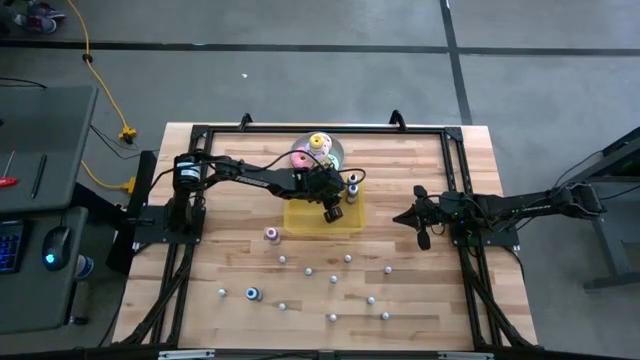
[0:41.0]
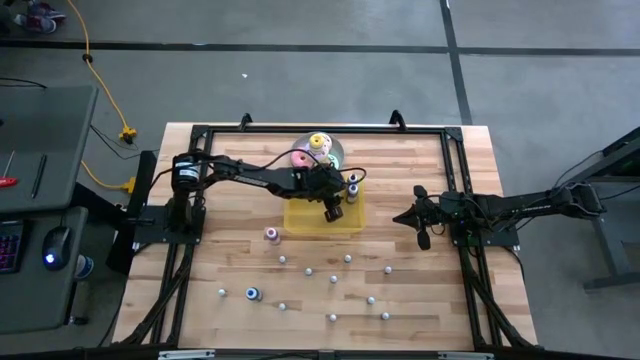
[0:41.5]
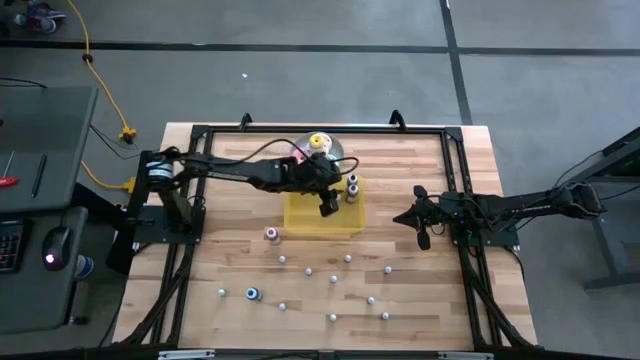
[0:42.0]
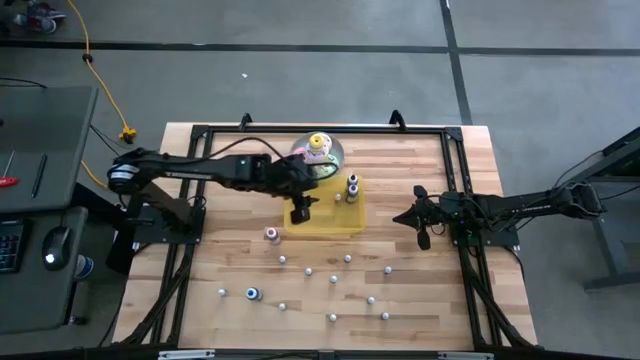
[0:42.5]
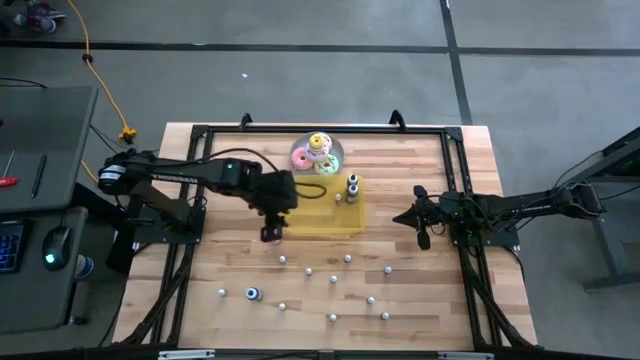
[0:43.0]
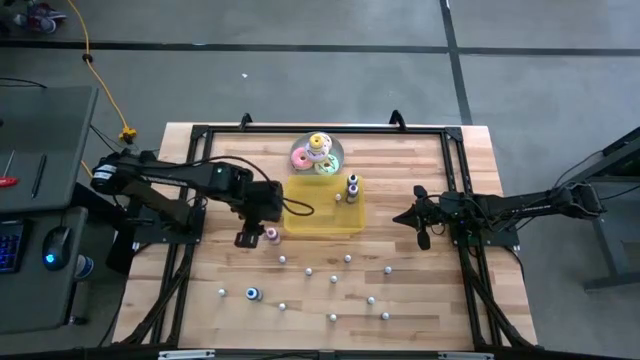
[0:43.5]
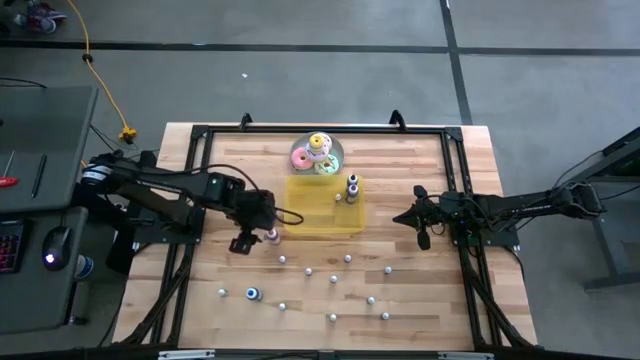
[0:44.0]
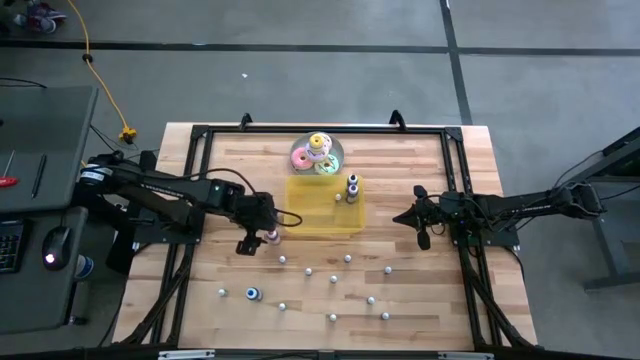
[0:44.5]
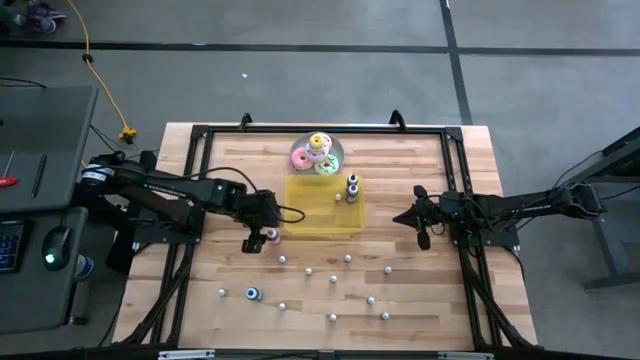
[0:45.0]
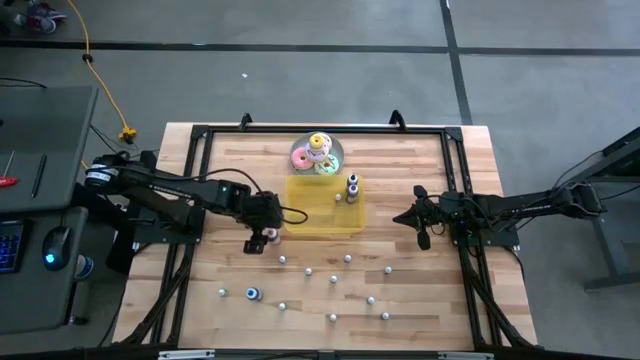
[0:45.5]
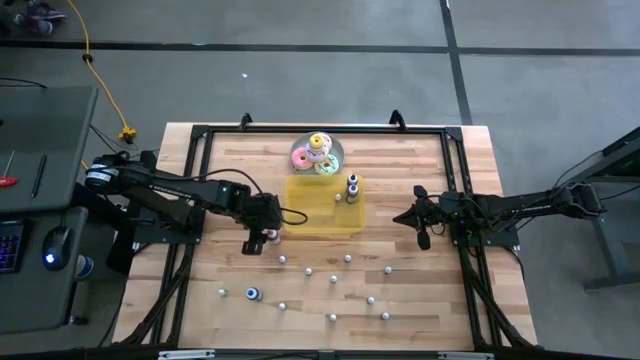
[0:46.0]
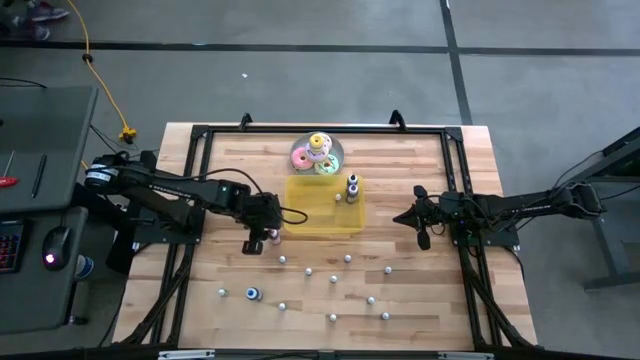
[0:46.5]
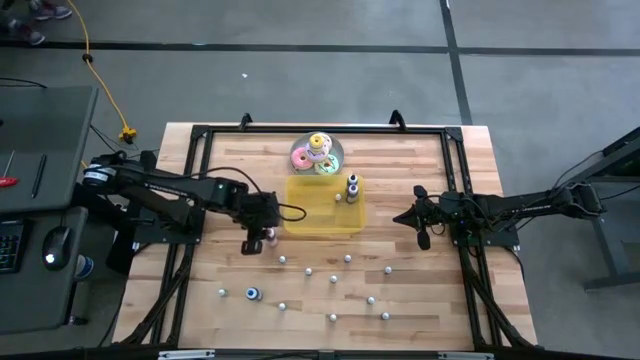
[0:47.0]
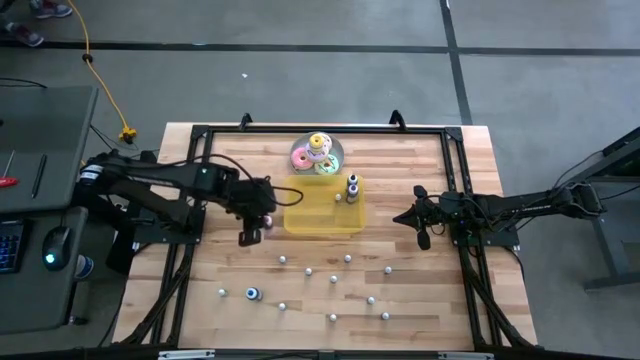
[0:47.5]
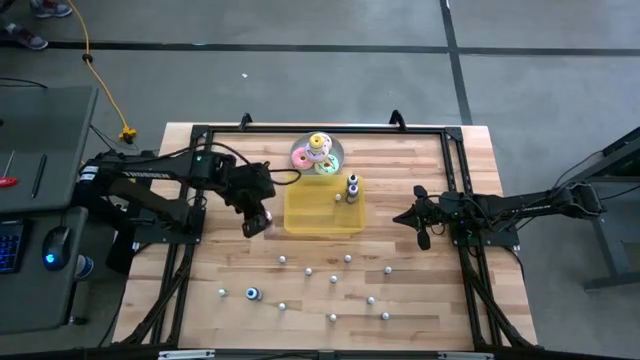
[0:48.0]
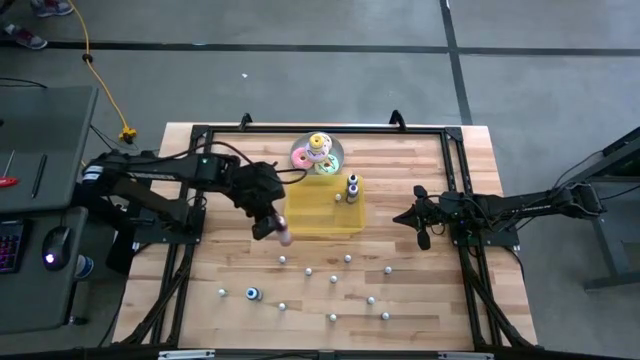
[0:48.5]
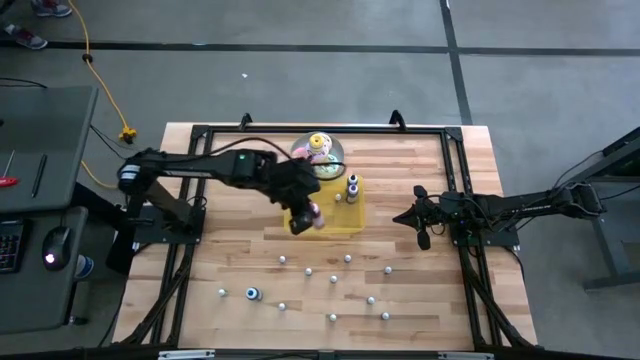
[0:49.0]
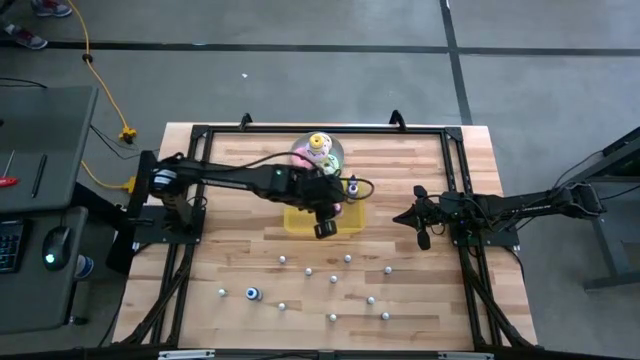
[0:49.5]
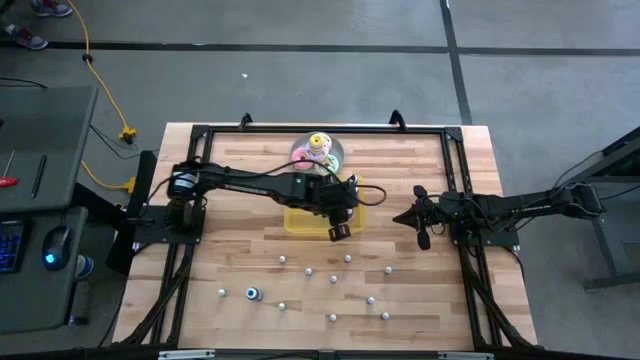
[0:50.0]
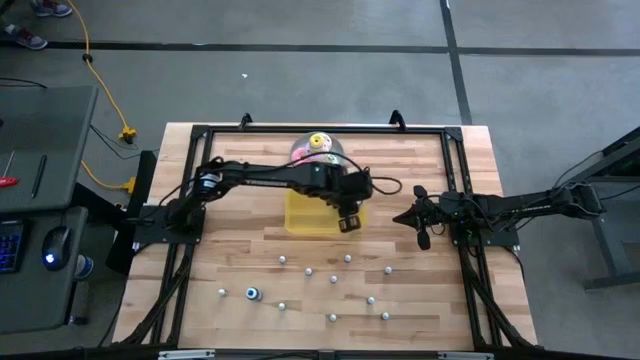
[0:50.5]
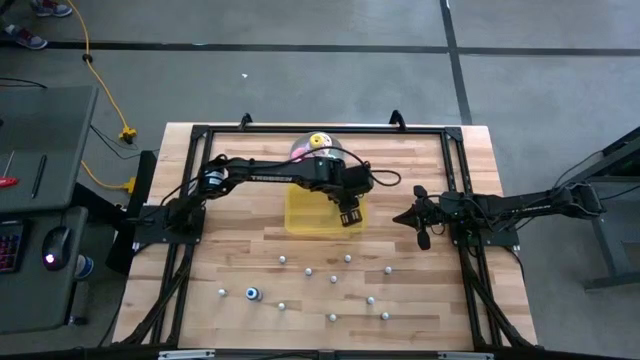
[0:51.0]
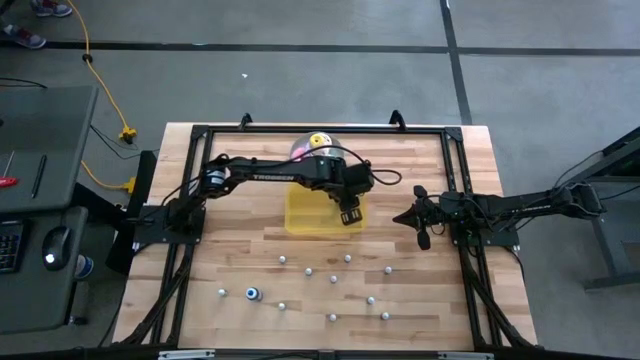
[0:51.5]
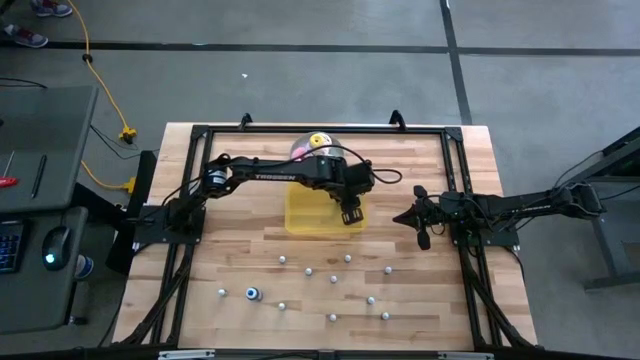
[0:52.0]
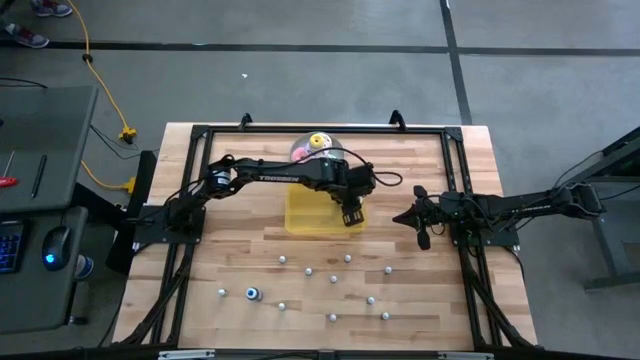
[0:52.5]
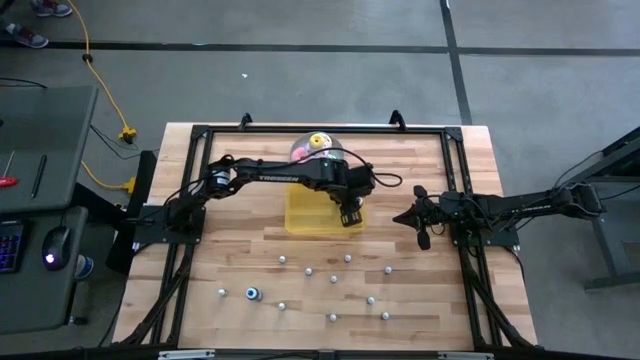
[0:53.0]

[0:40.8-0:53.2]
Task: Pick & Place food coloring
Put the large pink food coloring bottle into the yellow container

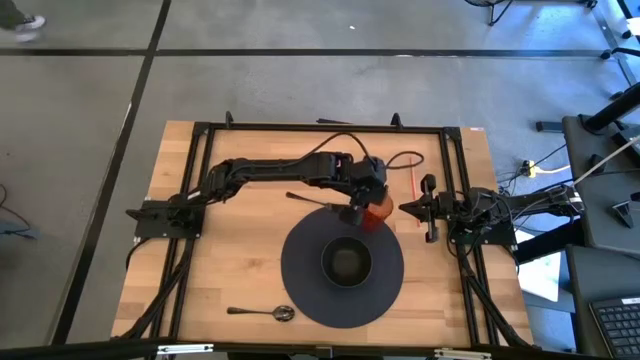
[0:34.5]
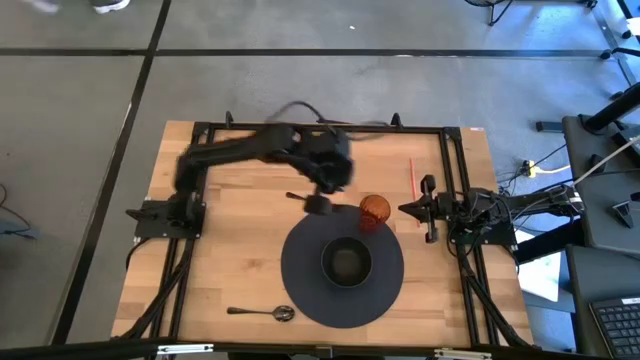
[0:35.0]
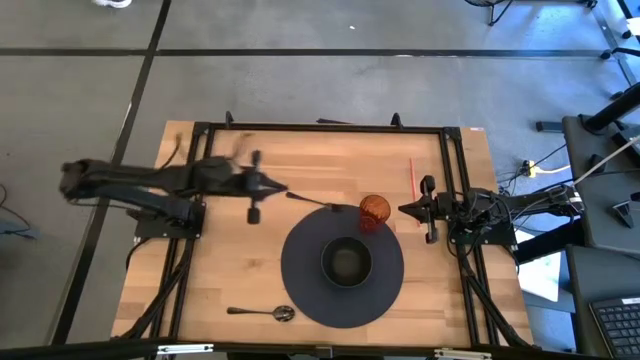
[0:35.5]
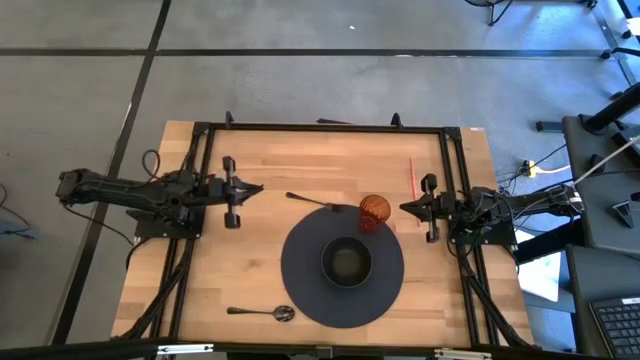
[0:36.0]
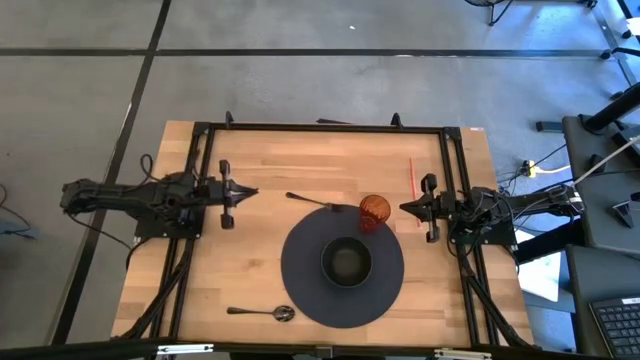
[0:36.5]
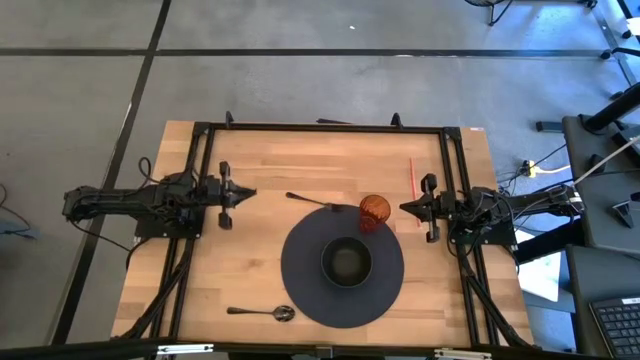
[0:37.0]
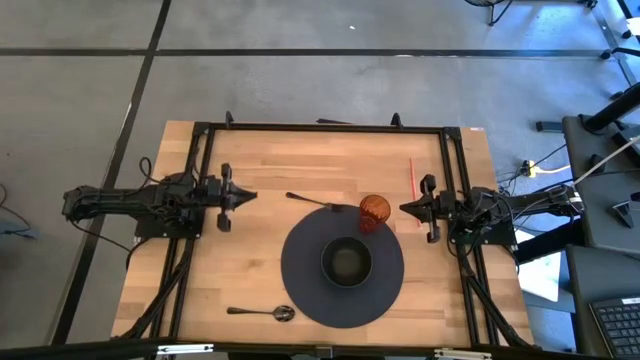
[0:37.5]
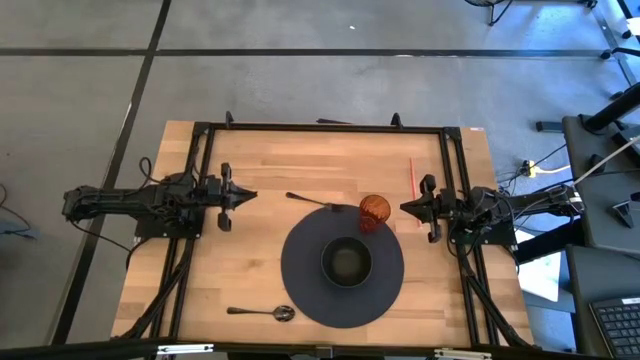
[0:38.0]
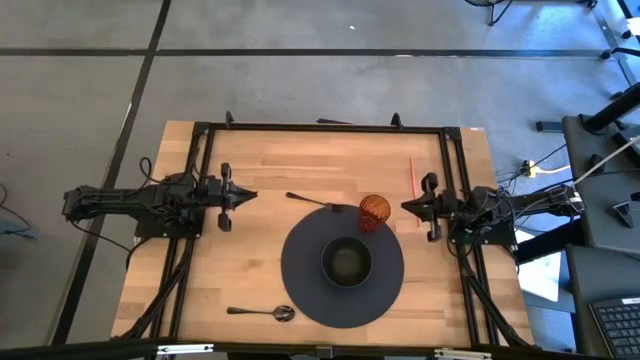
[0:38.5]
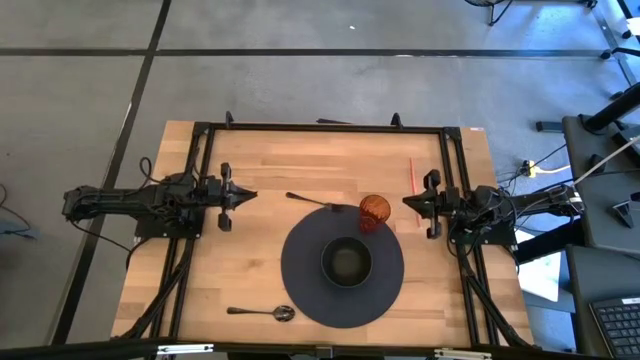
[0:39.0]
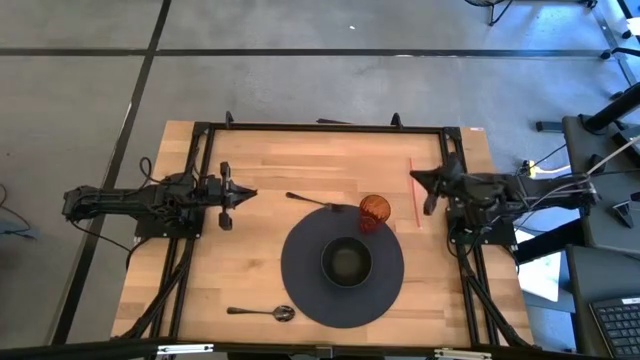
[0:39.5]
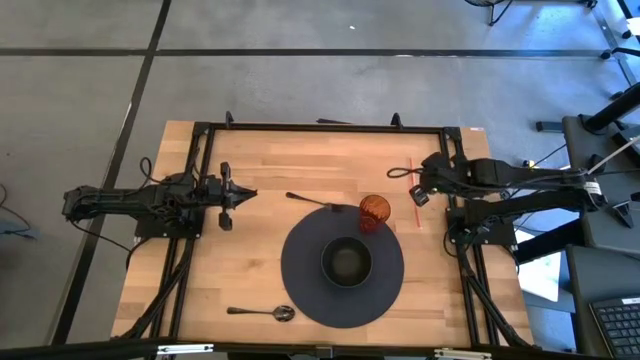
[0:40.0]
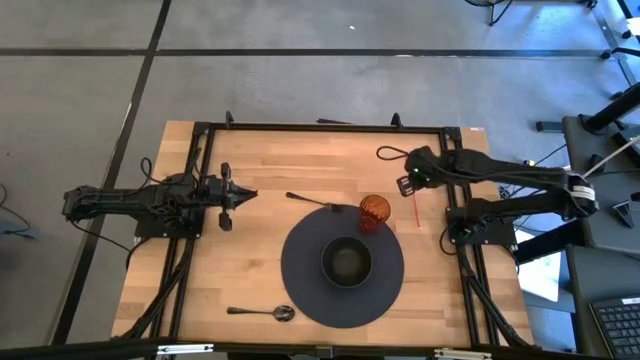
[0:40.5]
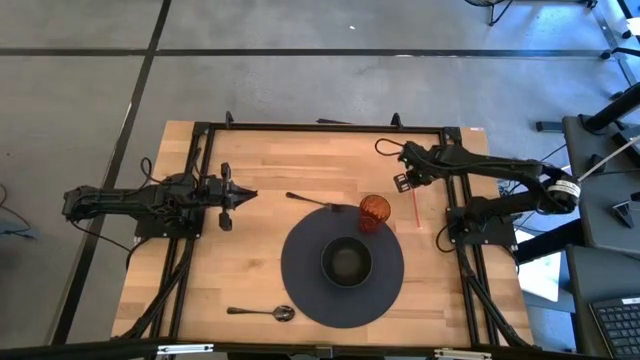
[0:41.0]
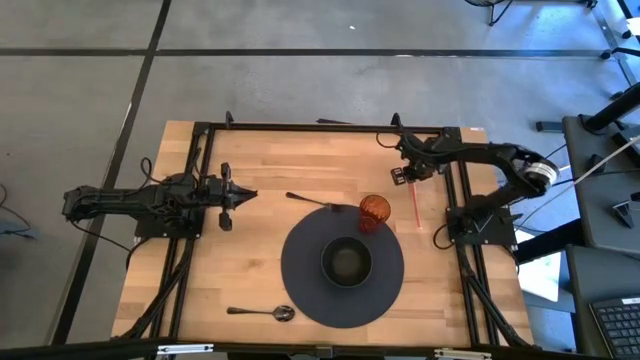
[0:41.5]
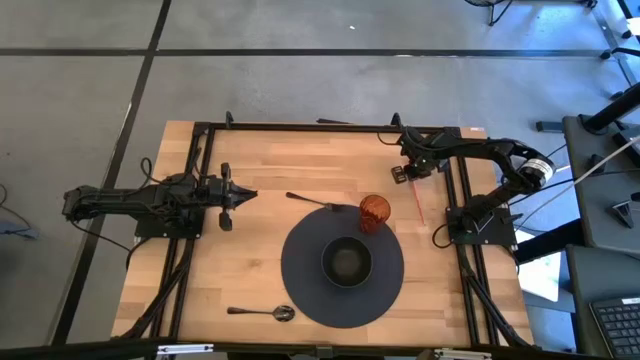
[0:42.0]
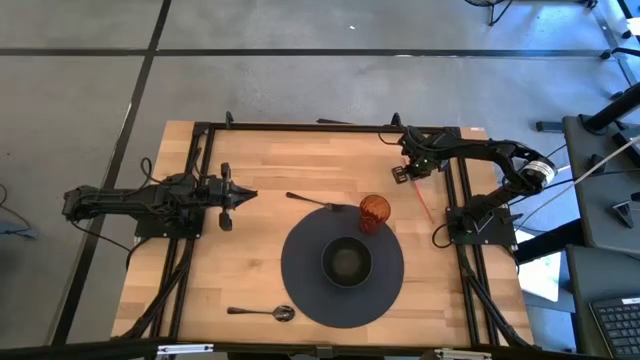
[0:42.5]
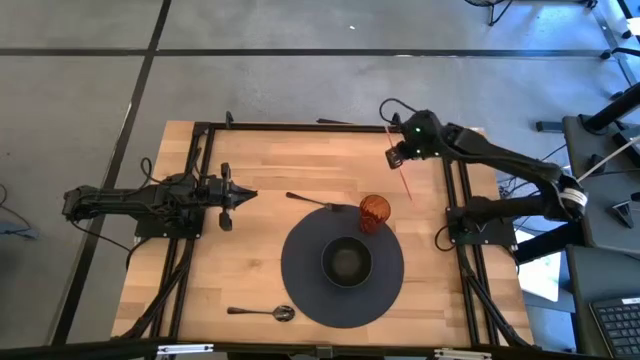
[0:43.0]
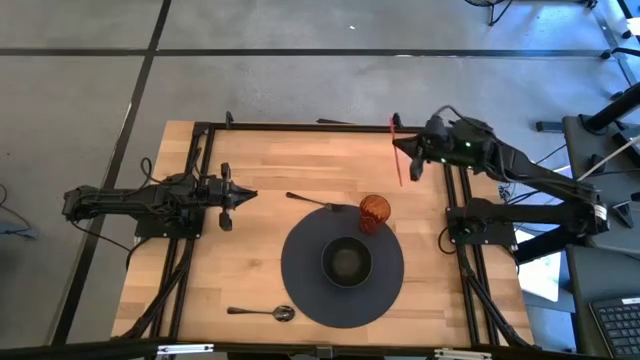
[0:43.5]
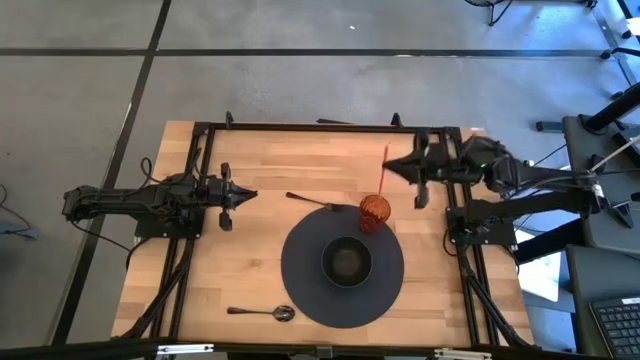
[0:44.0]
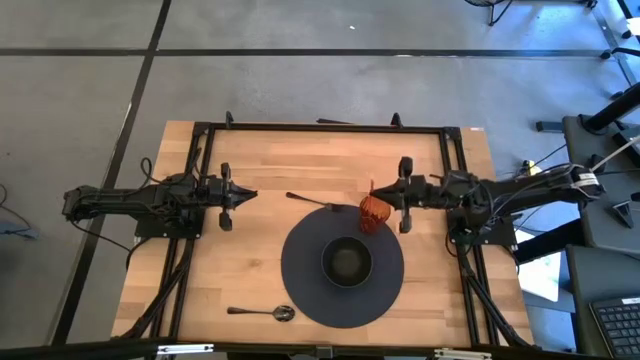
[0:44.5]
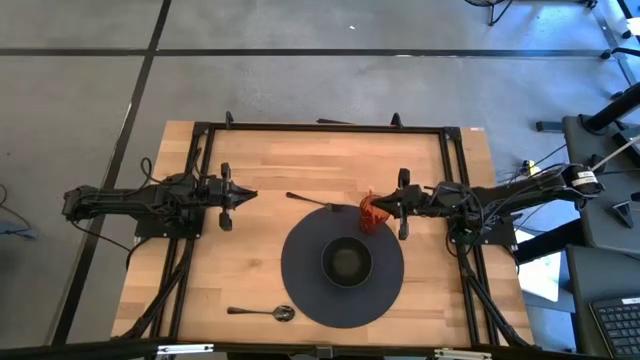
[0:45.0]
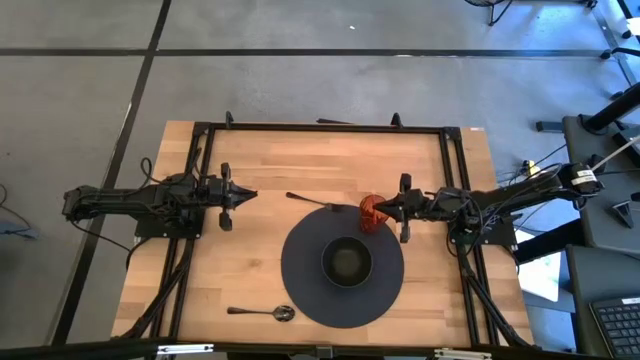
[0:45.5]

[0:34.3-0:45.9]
Task: Pick & Place Utensil
Put the orange straw into the orange cup
